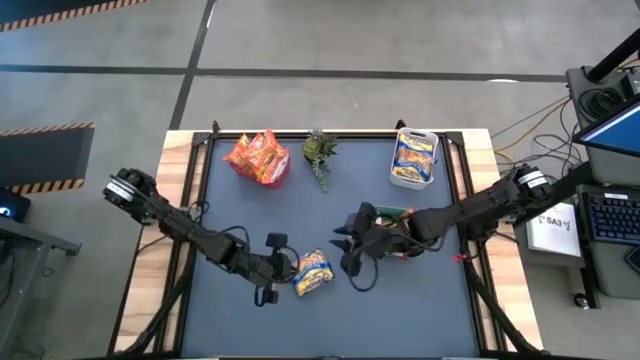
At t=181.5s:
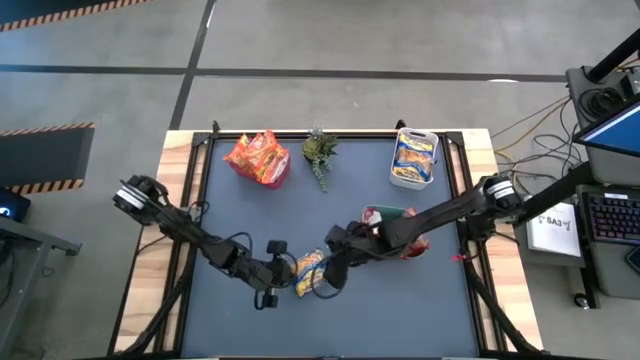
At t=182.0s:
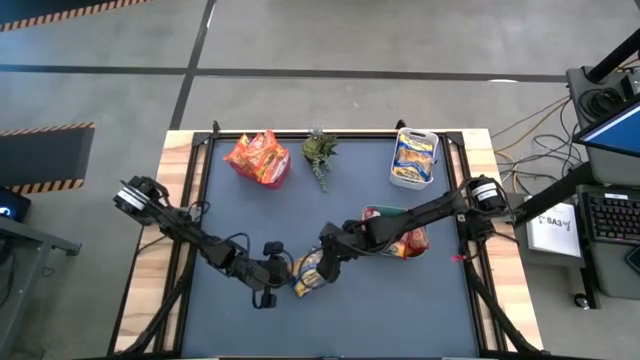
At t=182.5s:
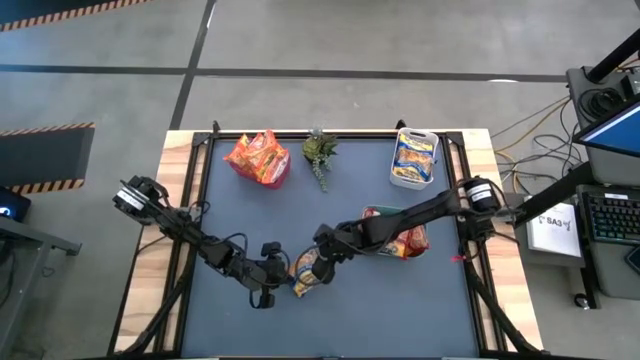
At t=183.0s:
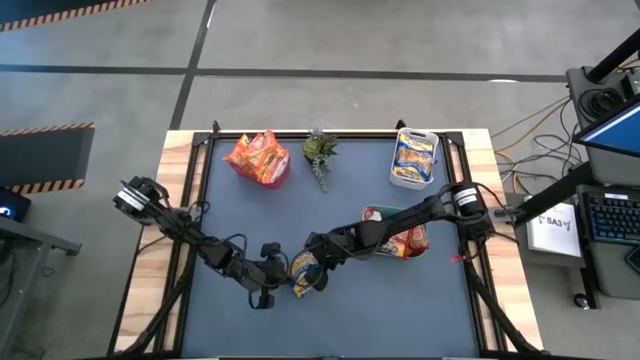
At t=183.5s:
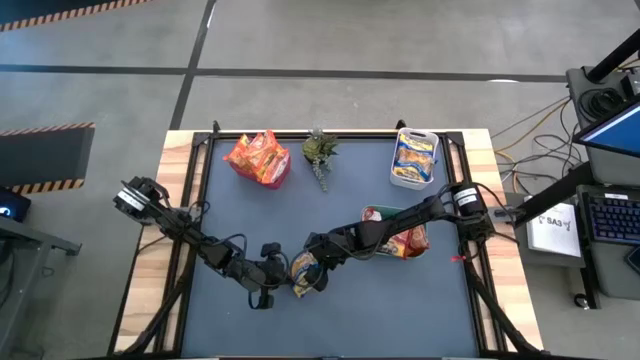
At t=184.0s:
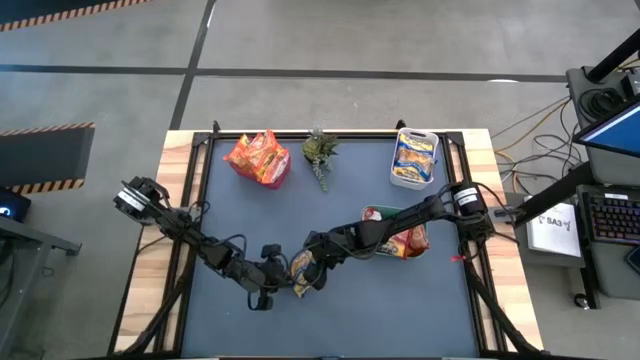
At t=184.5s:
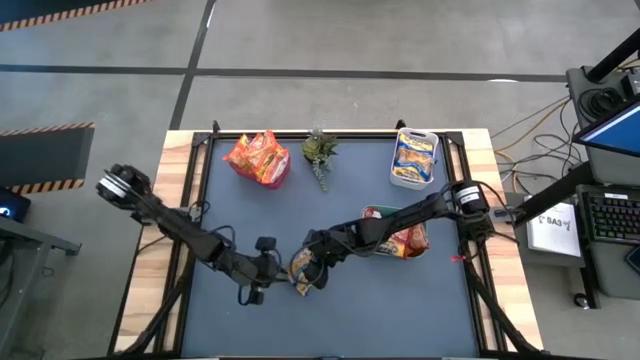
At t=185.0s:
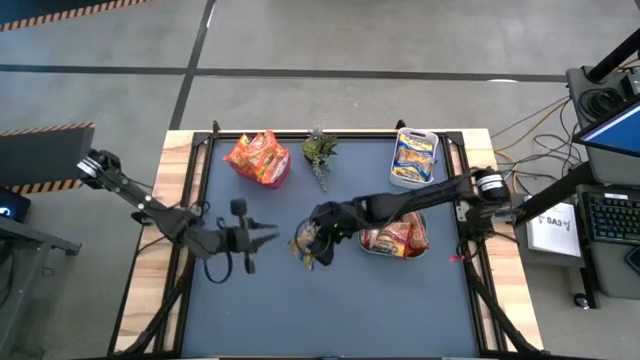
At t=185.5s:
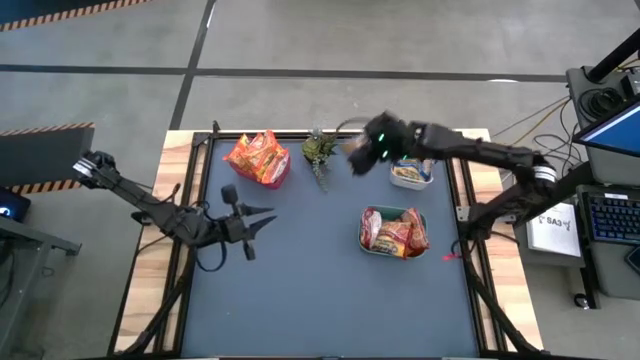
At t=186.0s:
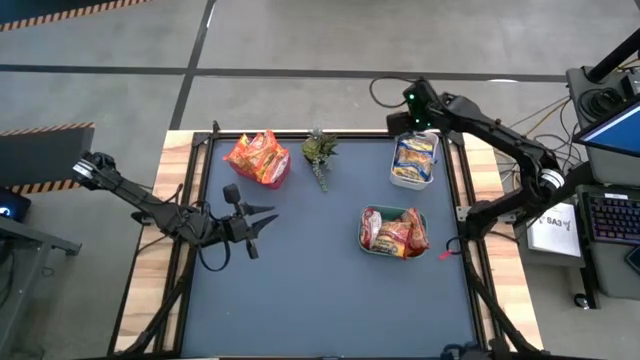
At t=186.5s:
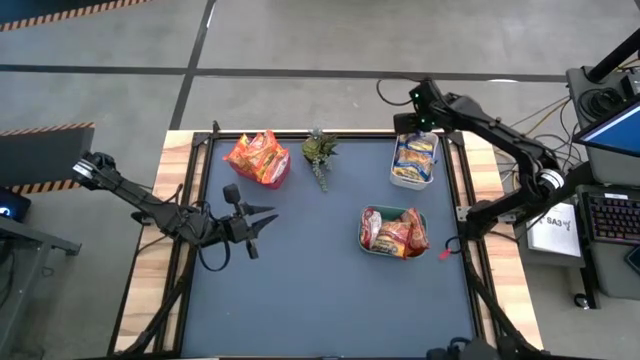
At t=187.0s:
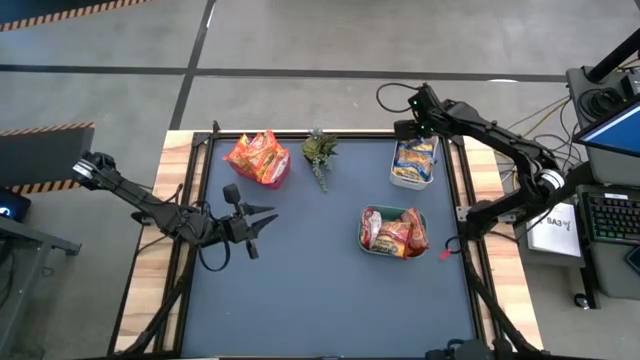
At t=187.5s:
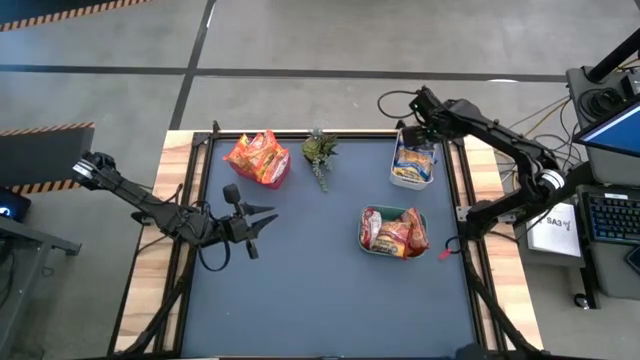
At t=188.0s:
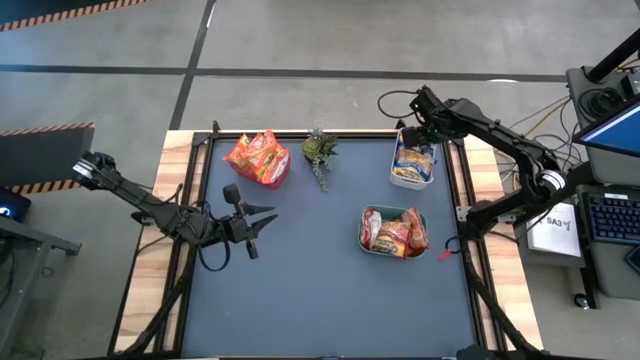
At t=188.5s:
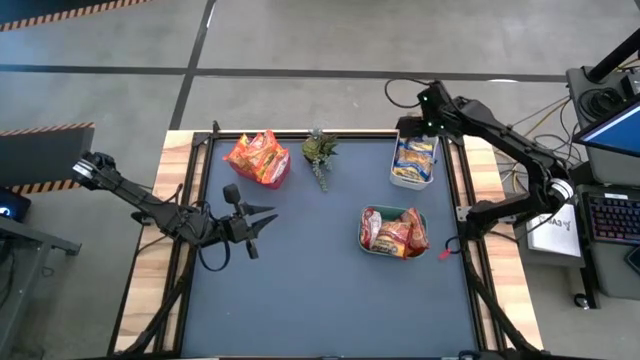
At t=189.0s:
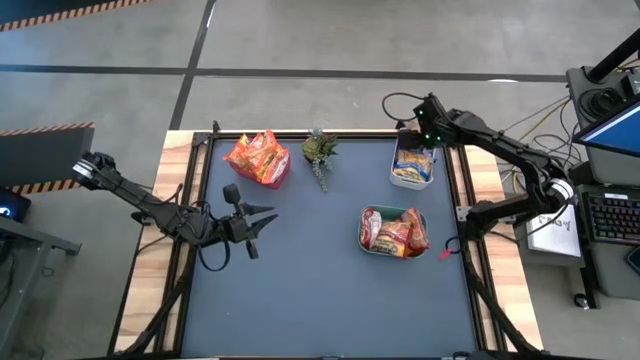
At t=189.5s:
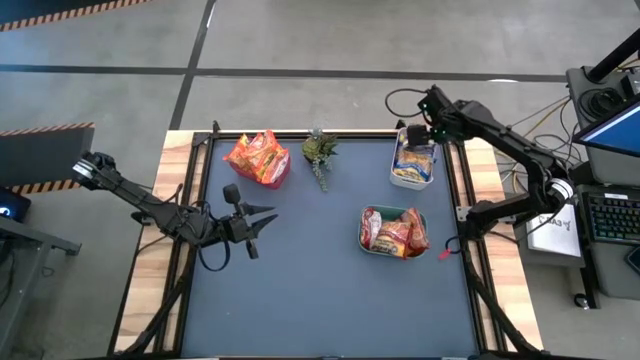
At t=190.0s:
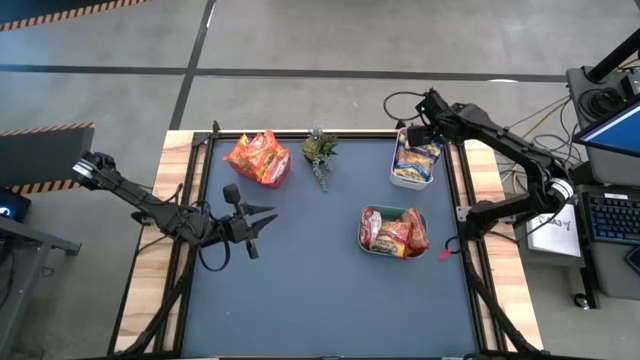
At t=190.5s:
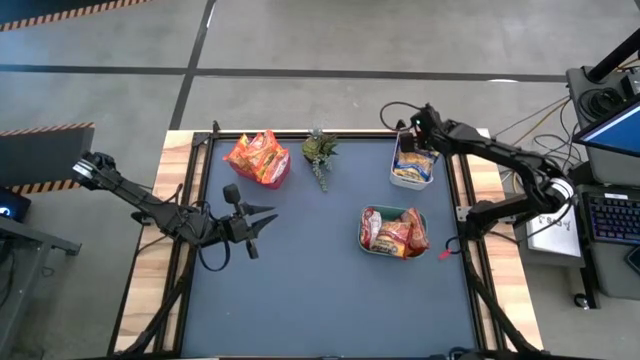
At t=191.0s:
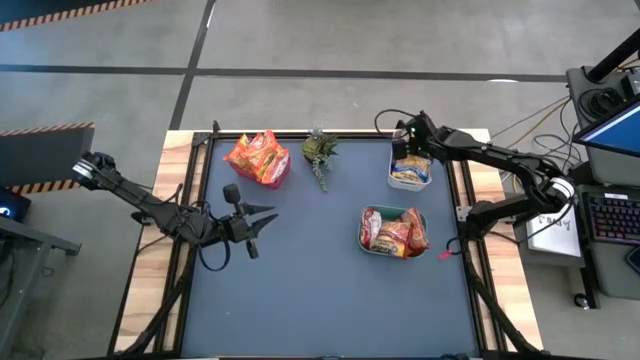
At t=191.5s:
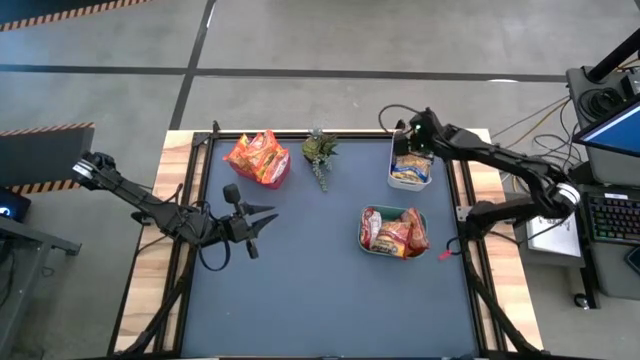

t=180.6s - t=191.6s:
Task: Sort Maruchan noodles
Put the blue noodle pack into the white bin

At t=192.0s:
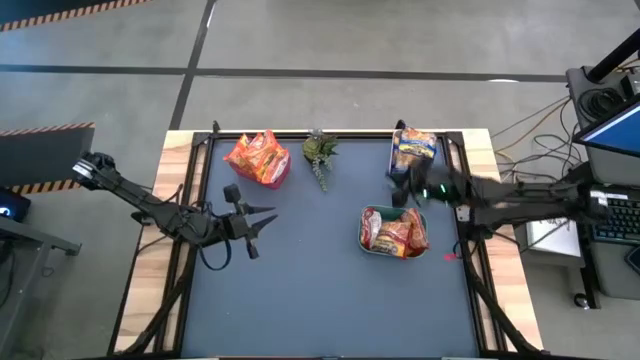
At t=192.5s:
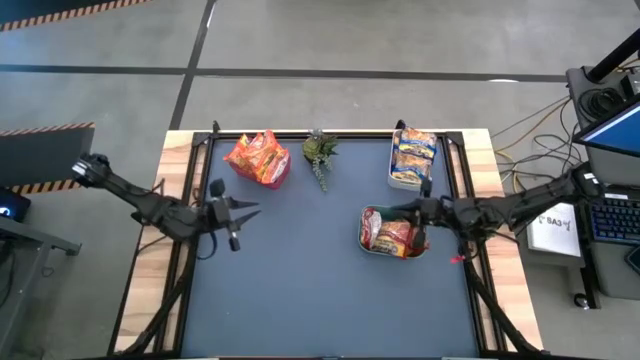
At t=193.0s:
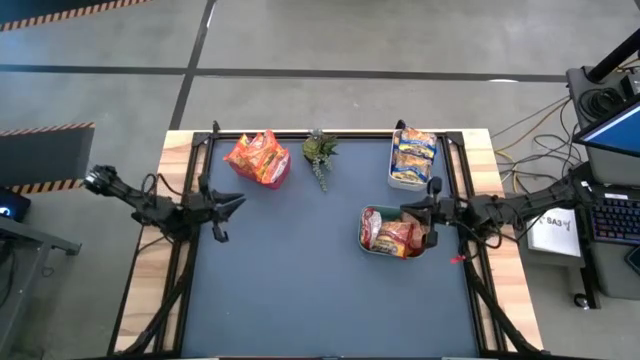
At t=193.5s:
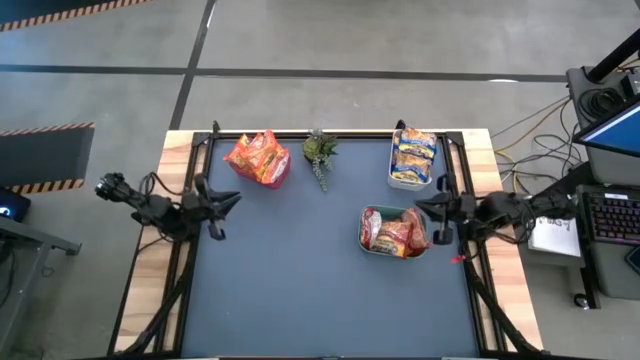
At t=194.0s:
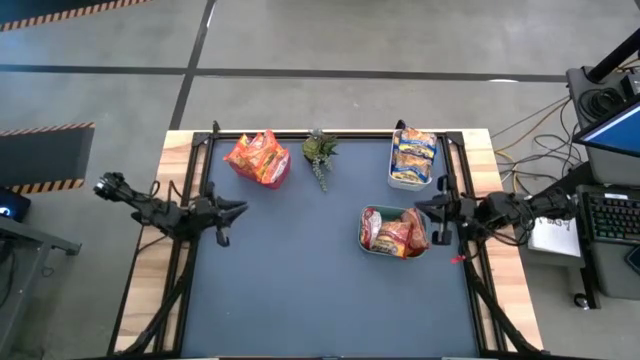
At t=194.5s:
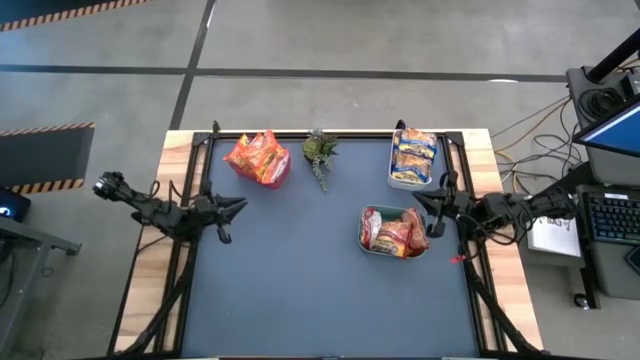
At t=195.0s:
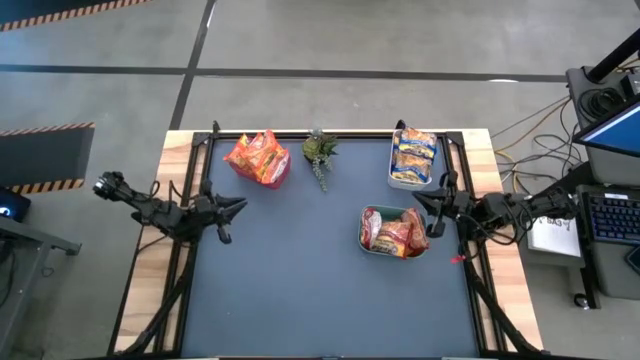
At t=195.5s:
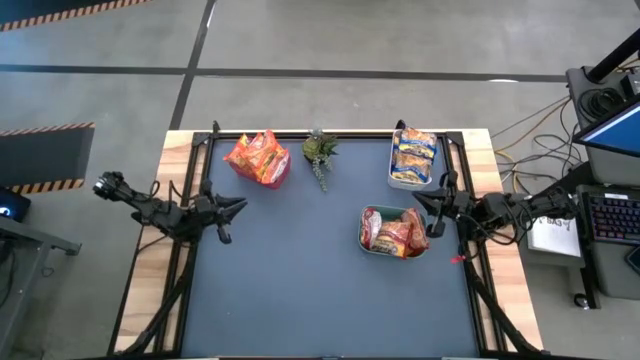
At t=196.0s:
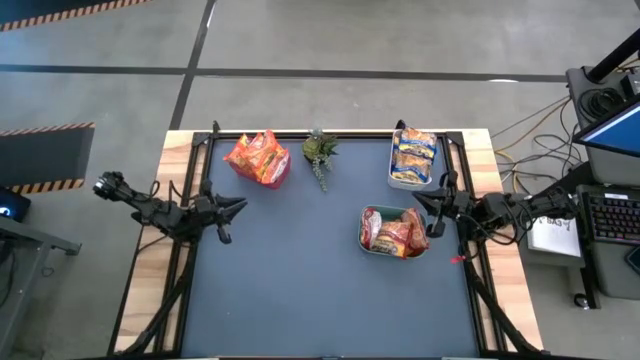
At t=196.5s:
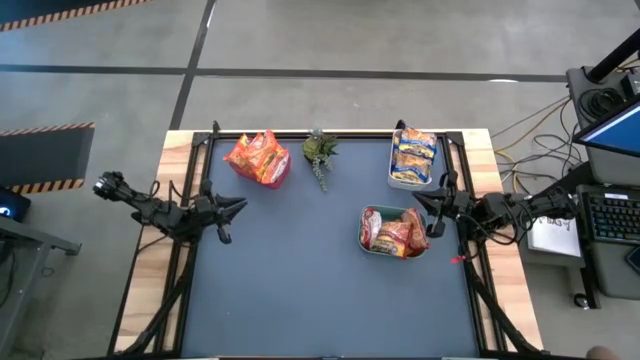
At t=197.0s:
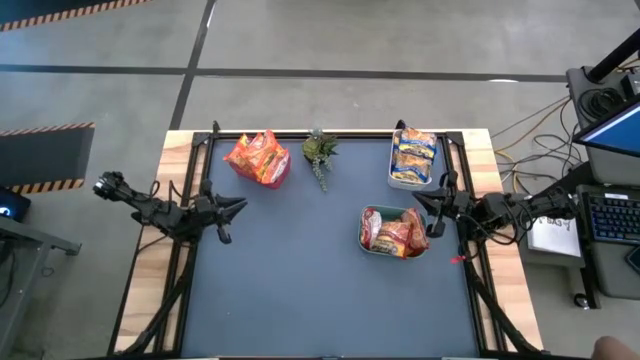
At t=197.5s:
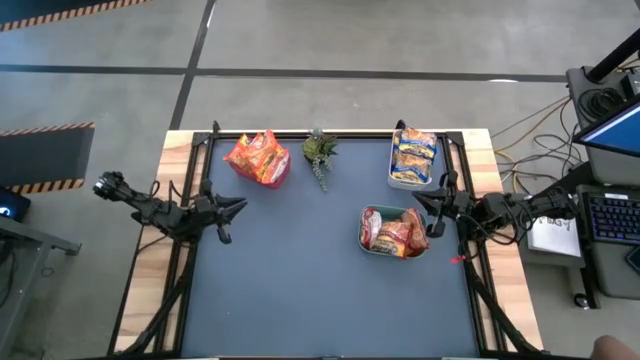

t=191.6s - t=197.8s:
Return to Home Position

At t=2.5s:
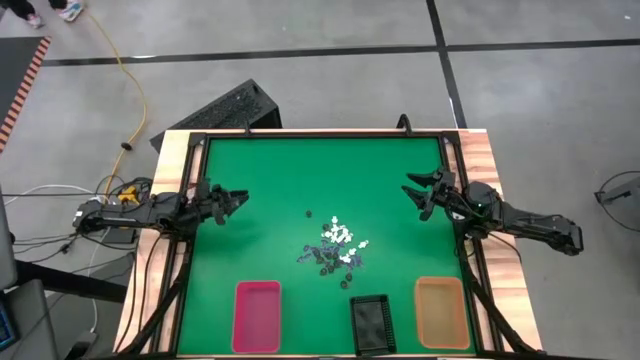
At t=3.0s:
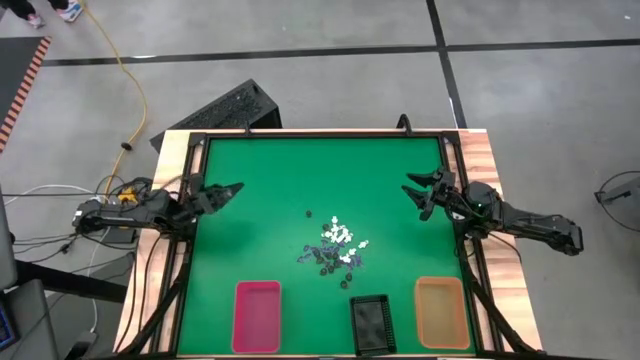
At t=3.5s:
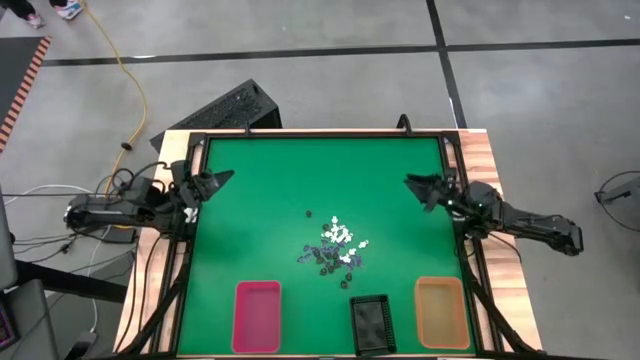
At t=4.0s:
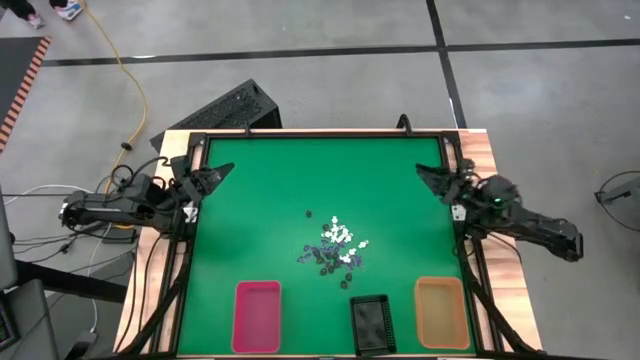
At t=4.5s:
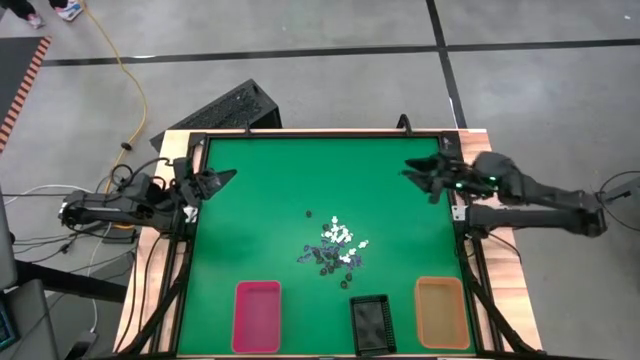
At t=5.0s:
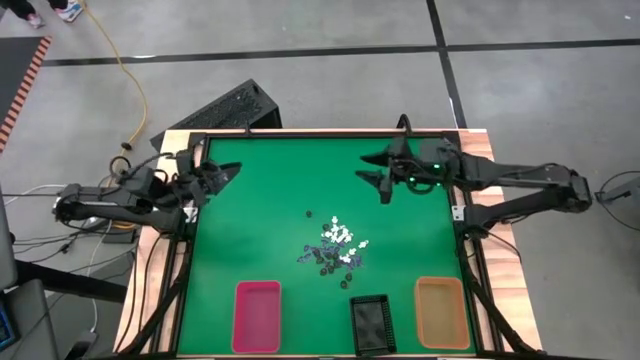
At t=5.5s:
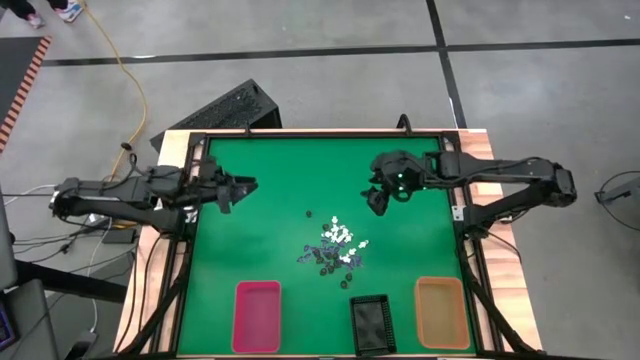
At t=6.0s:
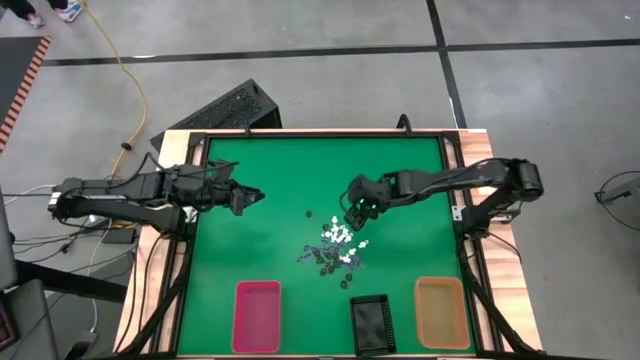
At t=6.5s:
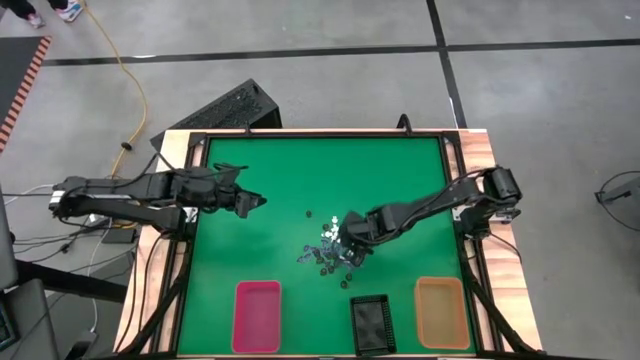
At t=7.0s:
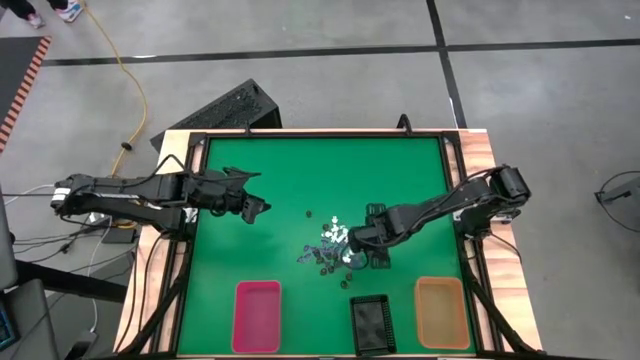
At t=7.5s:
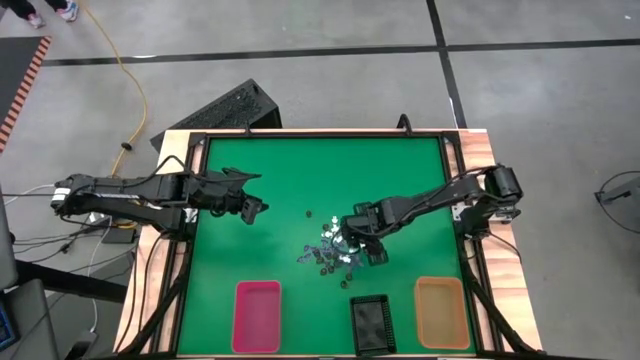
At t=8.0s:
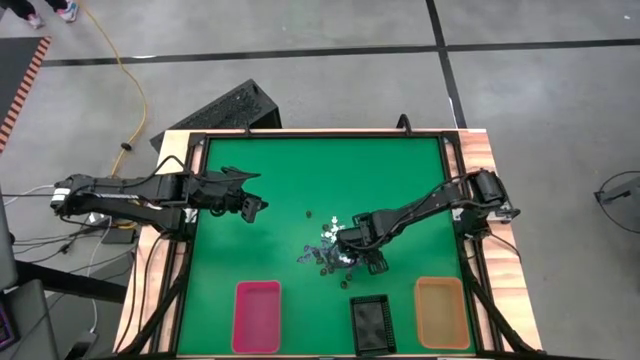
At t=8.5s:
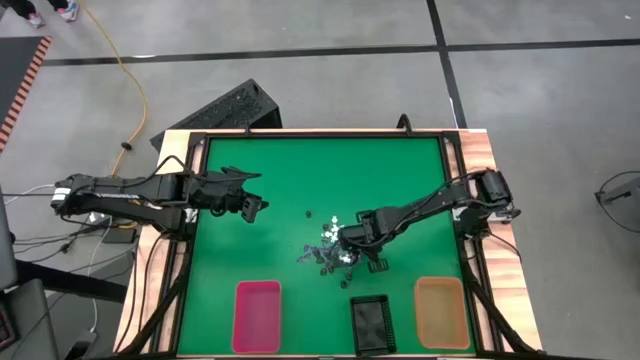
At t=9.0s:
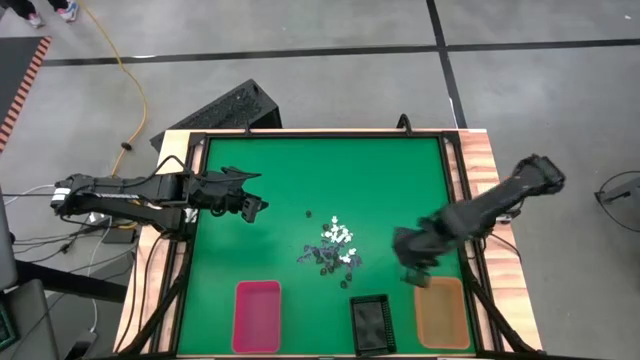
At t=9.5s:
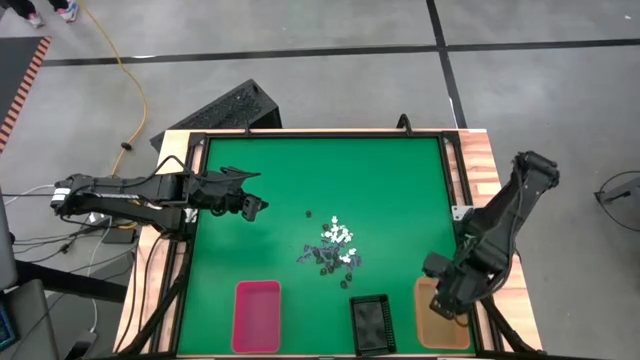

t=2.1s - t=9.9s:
Task: Sort Halloween decoration
Put the white skeleton toy in the right orange organizing bin
